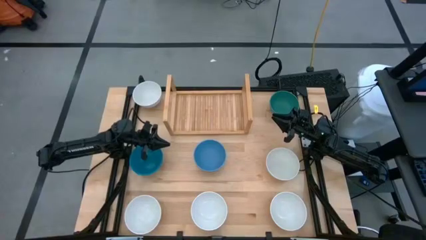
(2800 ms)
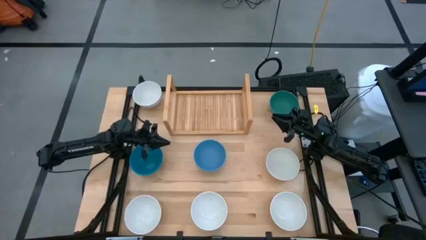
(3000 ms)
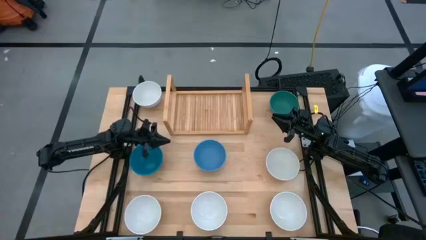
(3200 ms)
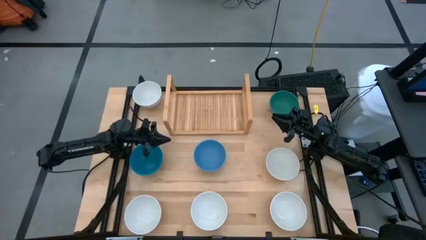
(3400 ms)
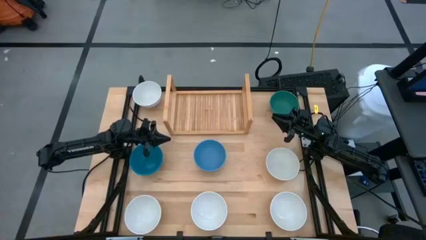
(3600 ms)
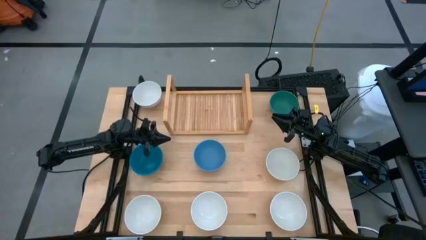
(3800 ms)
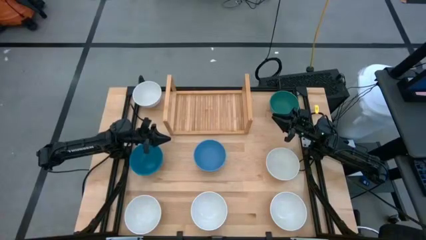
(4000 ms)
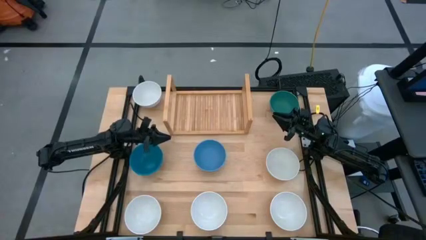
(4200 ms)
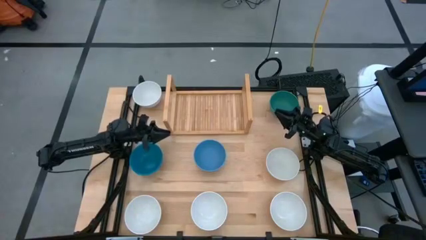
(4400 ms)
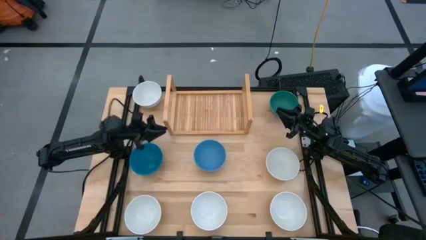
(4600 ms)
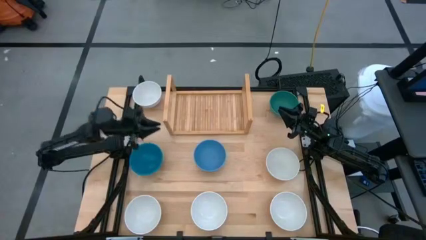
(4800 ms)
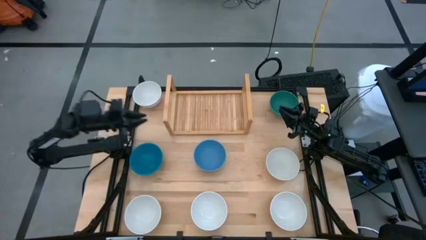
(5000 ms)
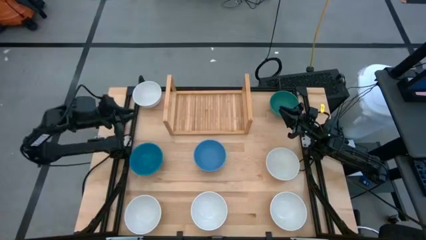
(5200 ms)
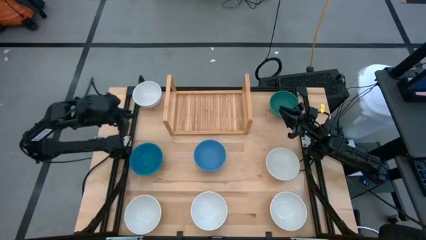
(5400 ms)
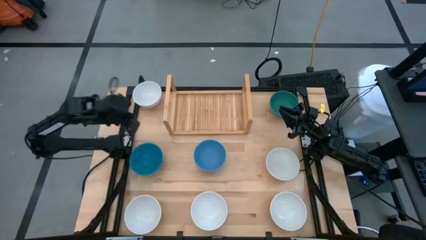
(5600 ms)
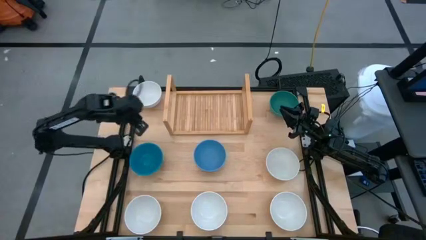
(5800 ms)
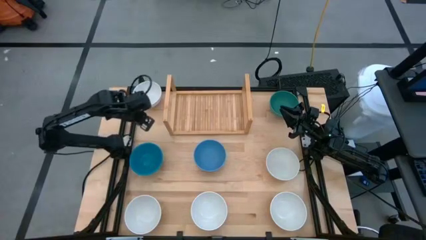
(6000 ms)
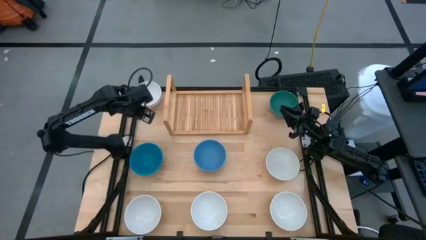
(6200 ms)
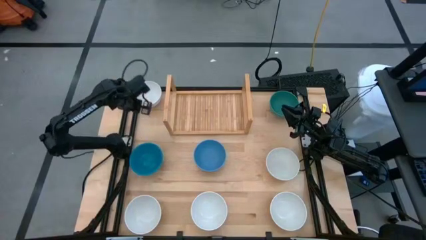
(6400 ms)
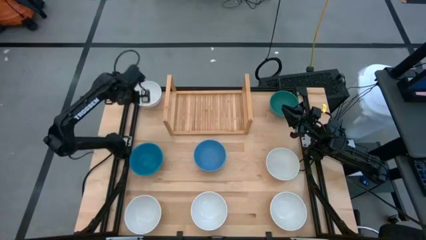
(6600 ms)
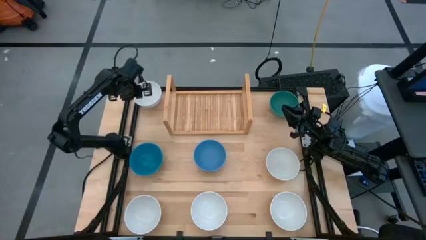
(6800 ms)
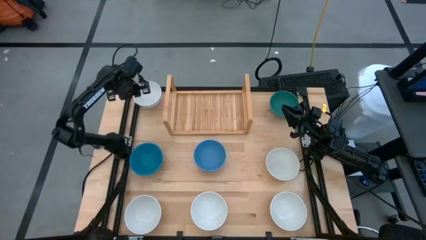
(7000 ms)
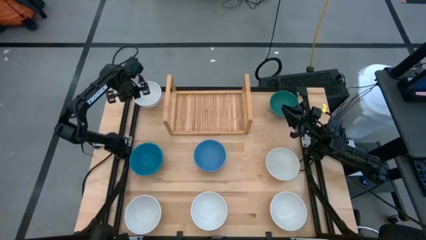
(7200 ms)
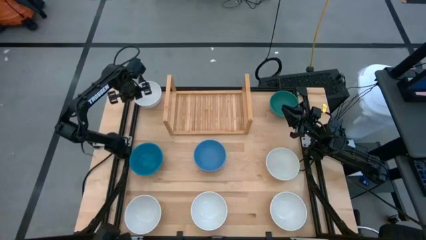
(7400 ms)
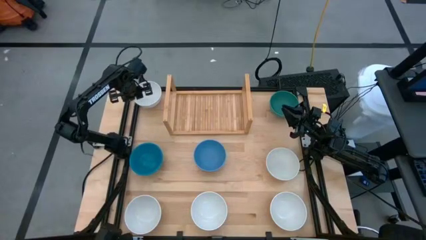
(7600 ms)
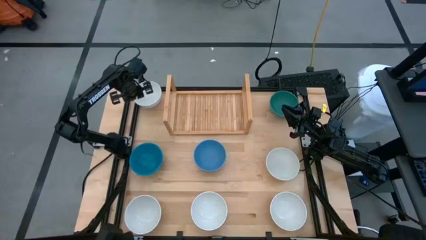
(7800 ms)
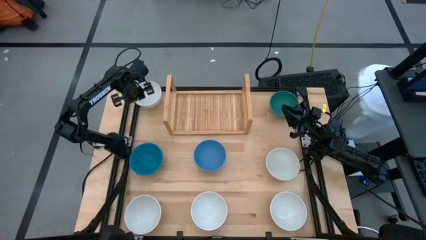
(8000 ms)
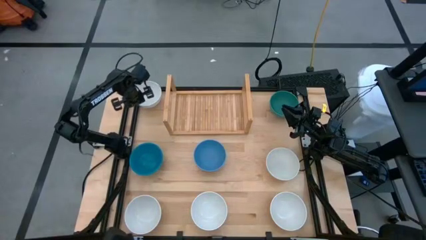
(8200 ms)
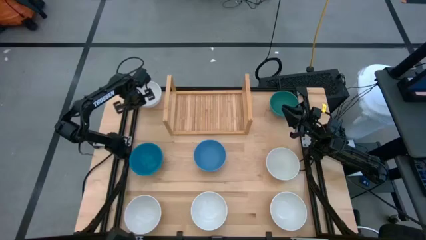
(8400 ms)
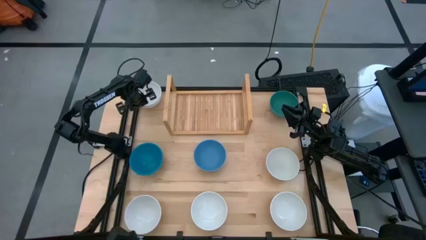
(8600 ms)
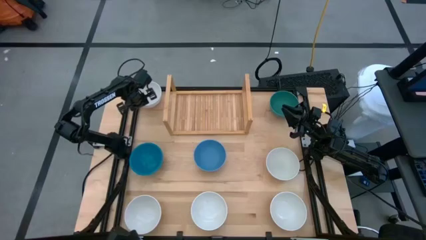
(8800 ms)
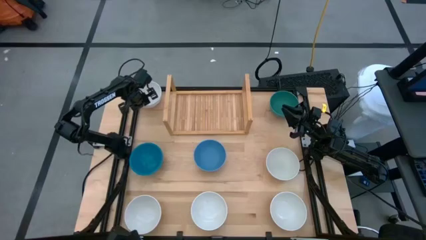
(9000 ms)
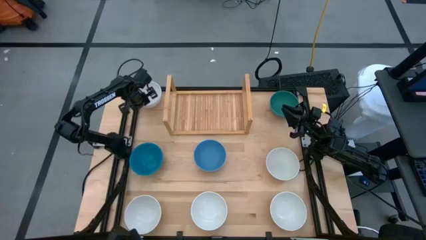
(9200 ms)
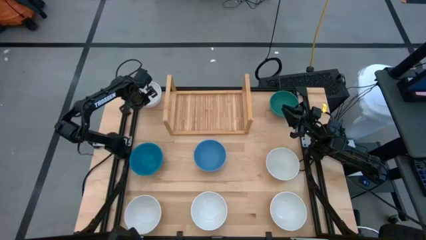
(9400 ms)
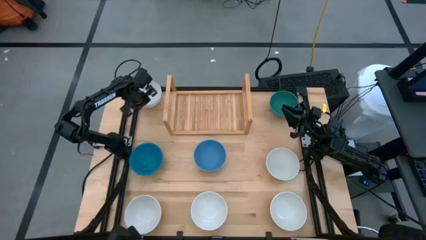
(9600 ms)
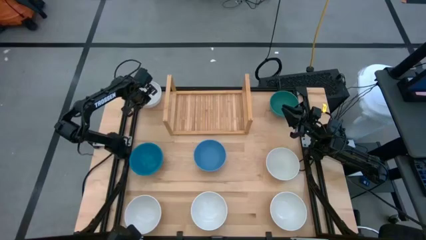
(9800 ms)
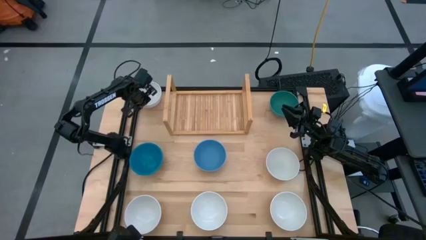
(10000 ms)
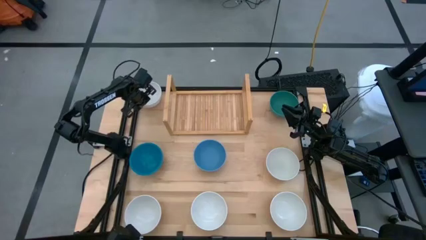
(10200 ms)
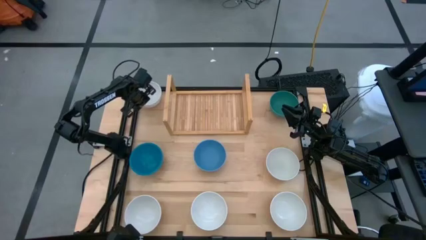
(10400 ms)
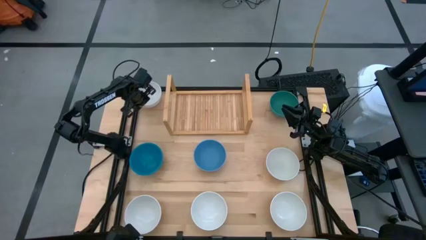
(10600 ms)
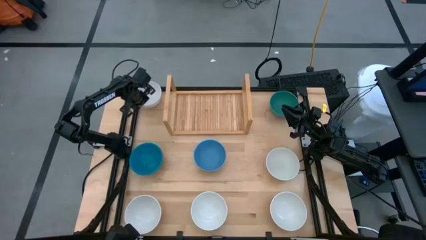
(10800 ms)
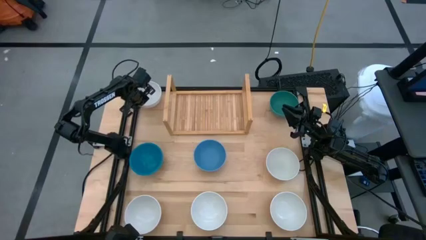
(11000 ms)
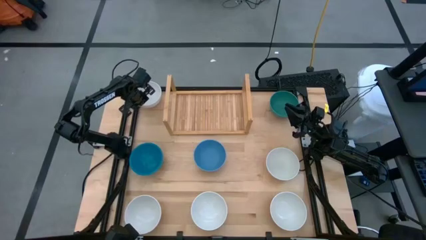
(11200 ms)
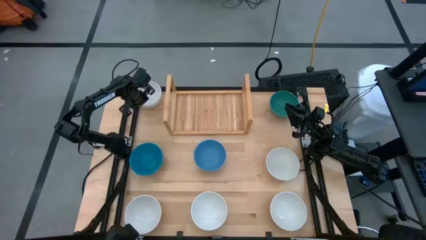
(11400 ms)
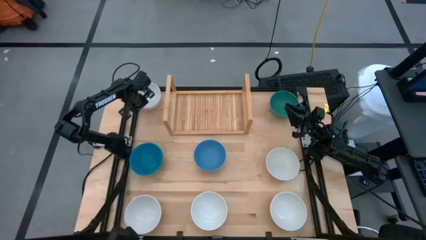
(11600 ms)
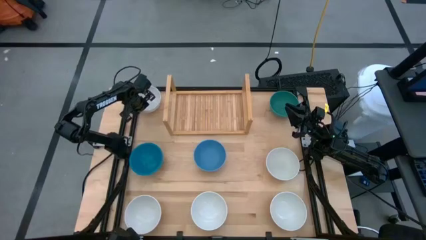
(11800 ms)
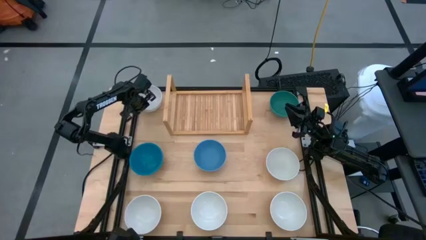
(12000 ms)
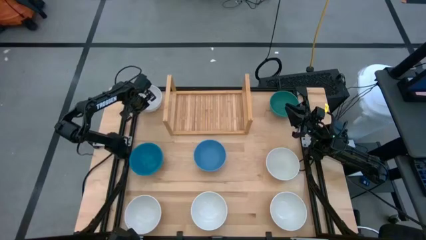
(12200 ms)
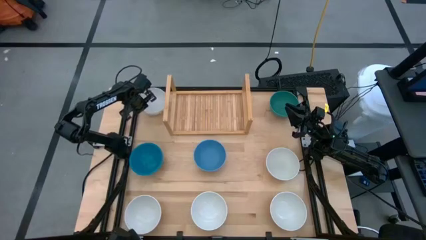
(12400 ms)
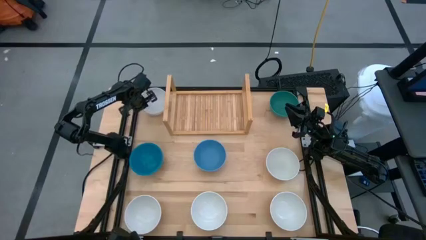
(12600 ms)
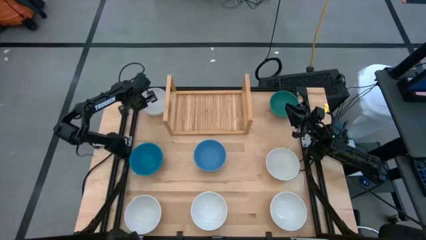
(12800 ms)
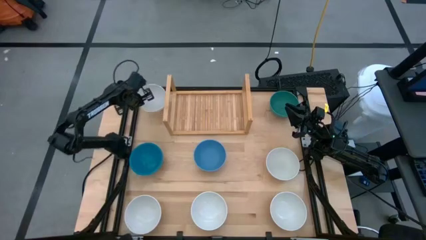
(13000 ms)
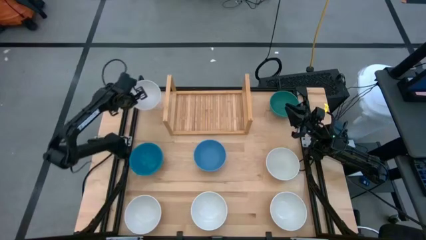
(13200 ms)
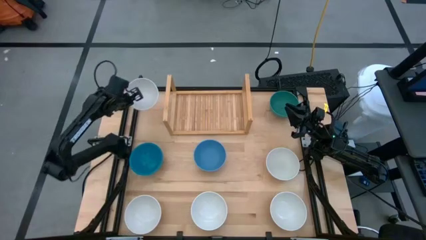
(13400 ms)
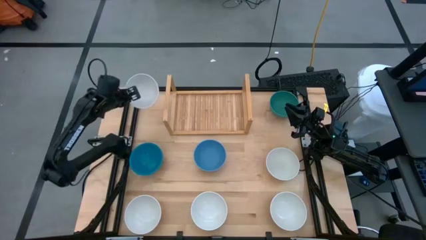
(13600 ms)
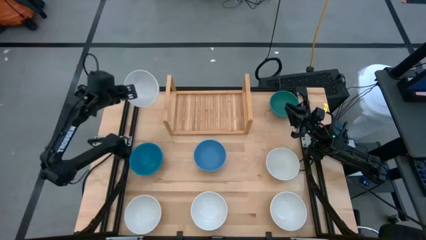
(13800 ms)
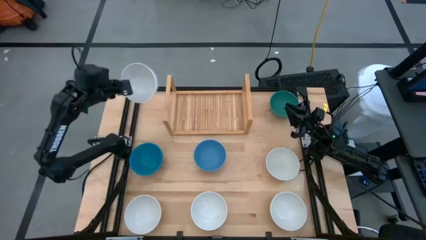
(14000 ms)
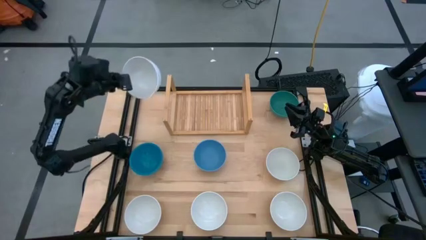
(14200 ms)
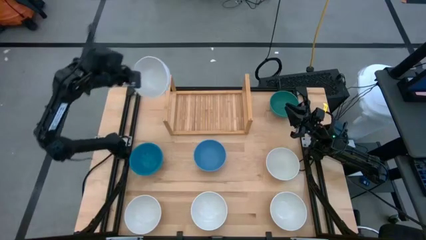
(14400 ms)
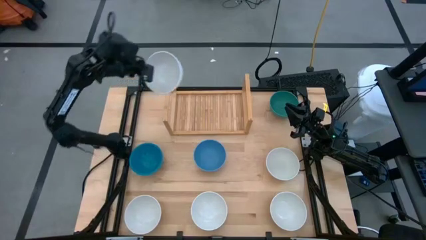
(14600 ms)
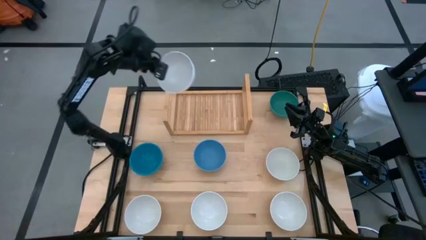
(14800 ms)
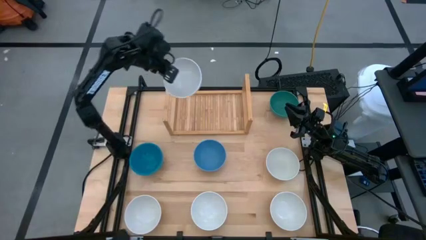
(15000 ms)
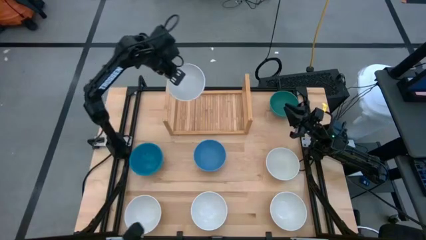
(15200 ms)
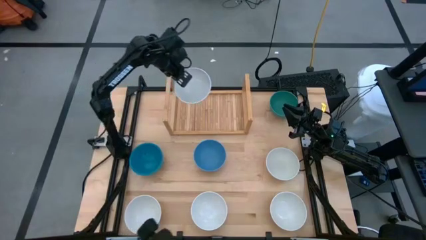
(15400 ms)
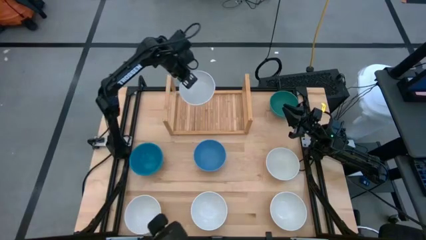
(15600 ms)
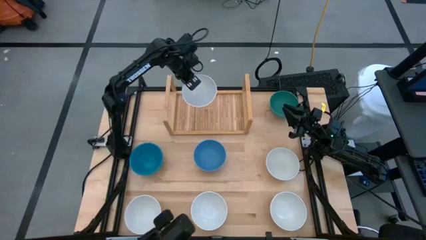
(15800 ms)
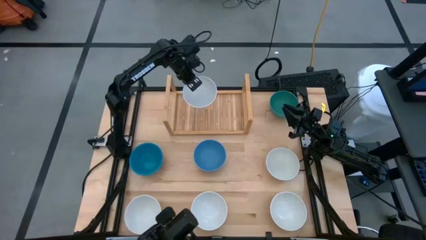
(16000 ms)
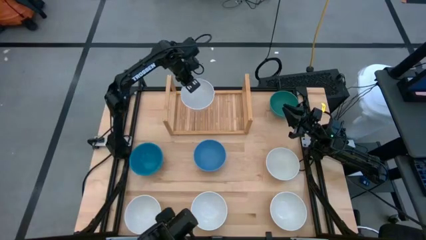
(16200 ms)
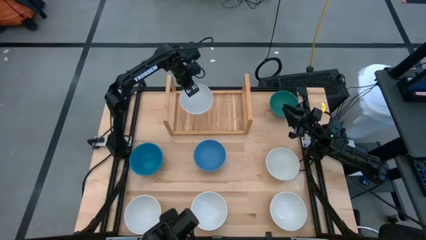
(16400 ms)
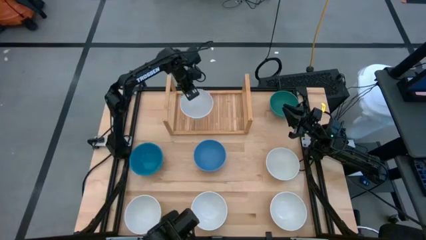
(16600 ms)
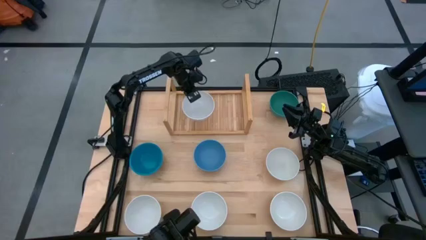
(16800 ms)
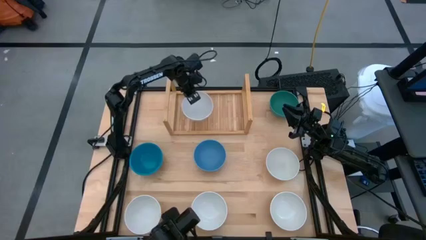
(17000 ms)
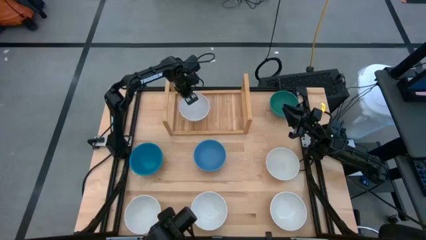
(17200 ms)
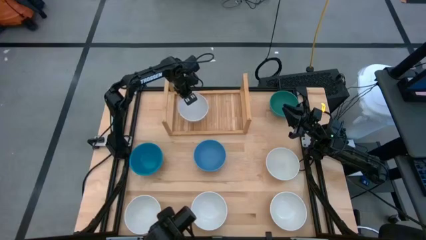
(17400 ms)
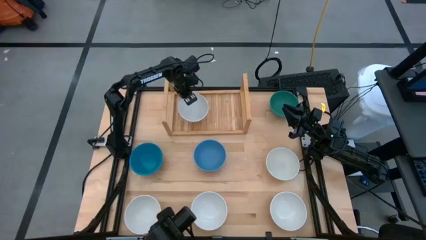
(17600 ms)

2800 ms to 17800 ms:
Task: Place and stack bowls onto a shelf
Put the white bowl on the shelf
